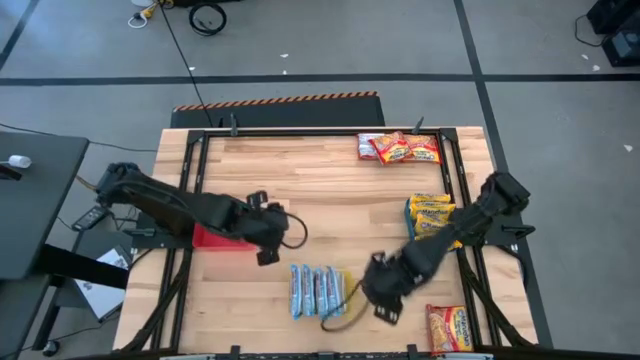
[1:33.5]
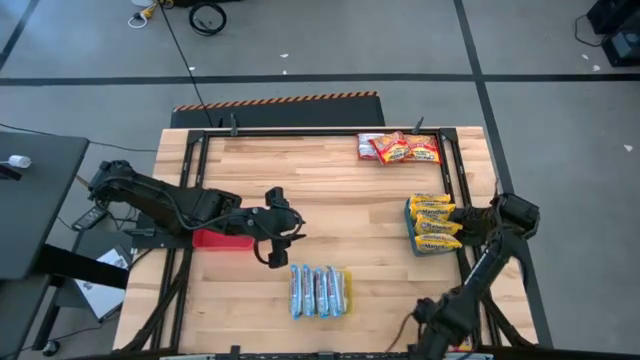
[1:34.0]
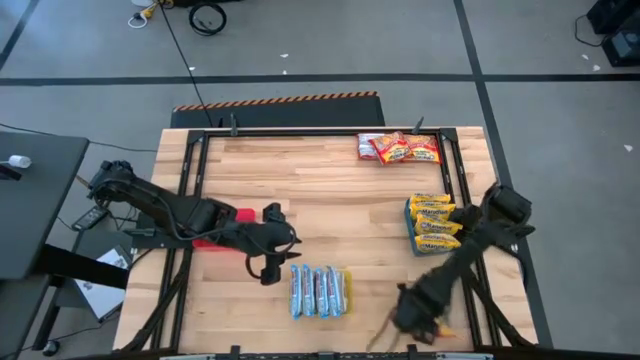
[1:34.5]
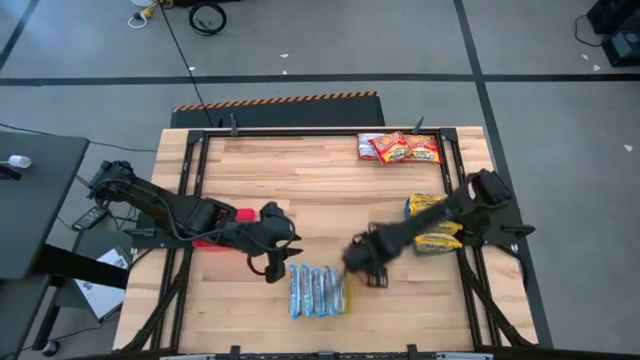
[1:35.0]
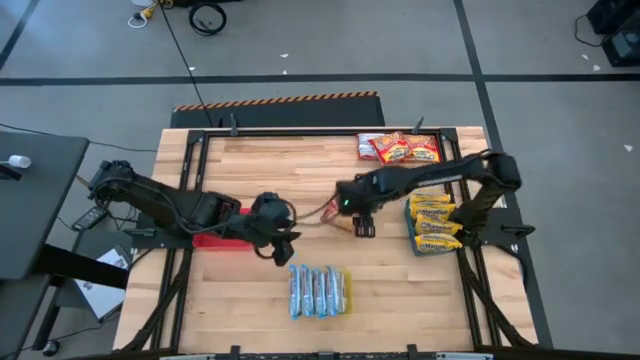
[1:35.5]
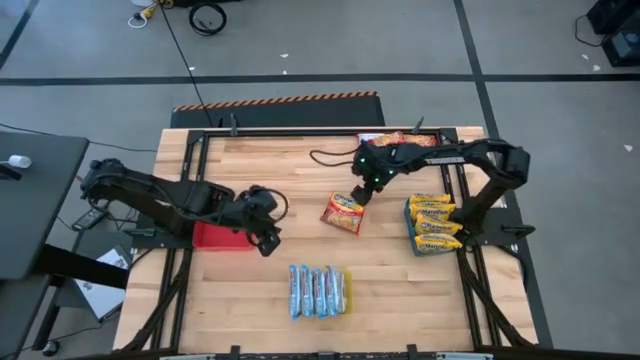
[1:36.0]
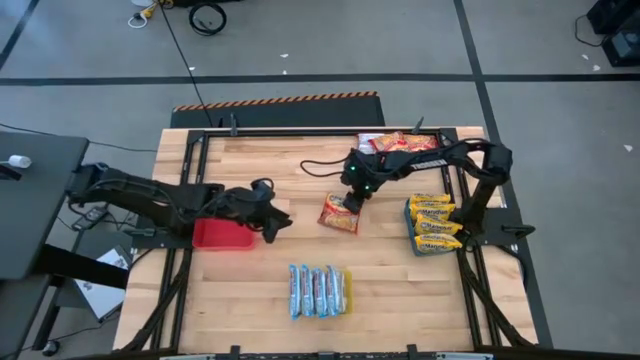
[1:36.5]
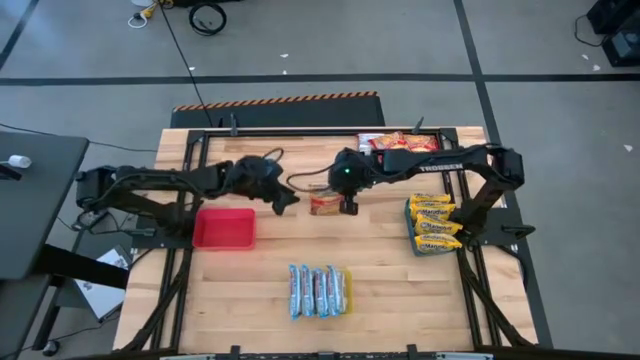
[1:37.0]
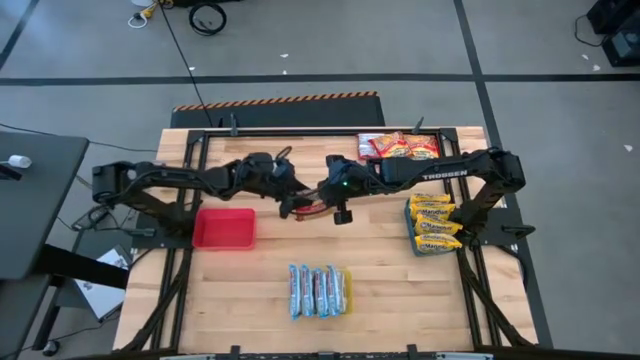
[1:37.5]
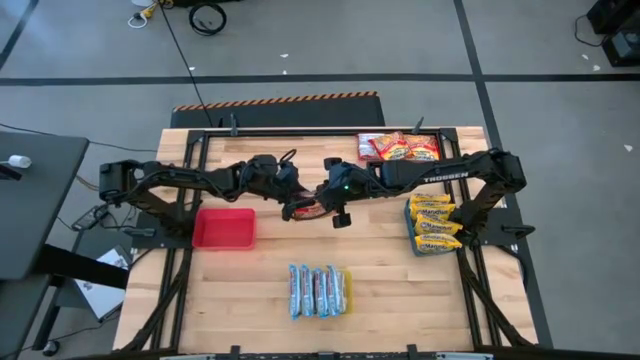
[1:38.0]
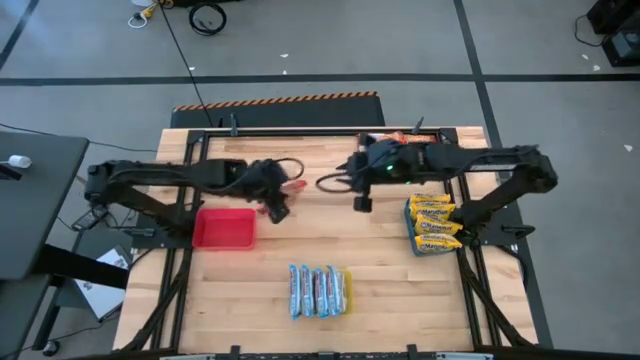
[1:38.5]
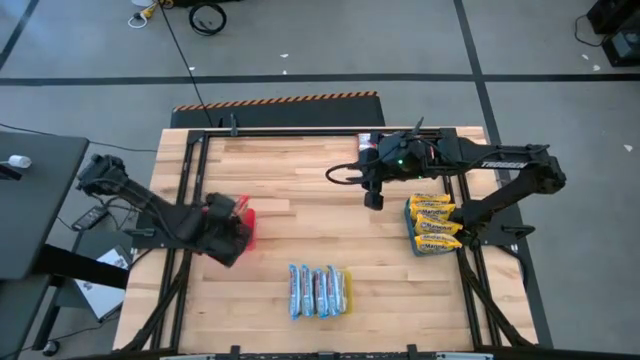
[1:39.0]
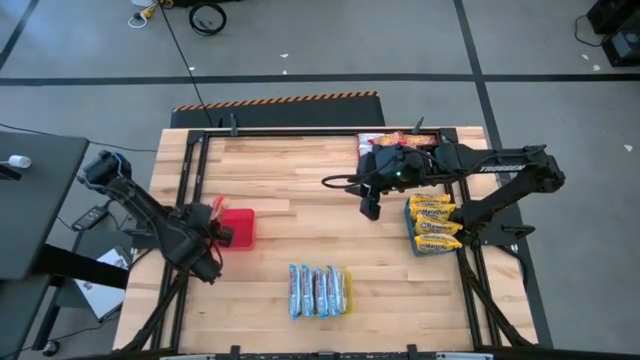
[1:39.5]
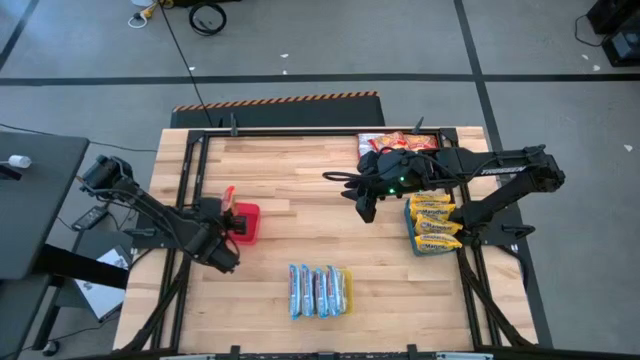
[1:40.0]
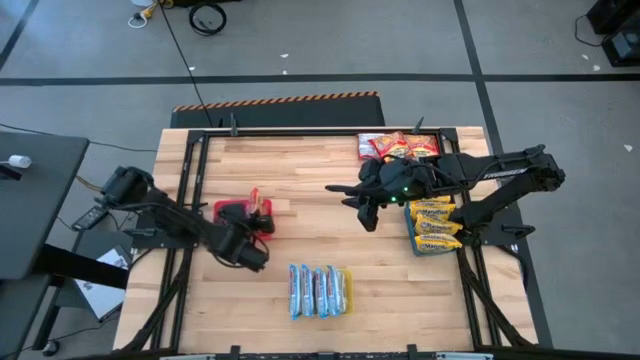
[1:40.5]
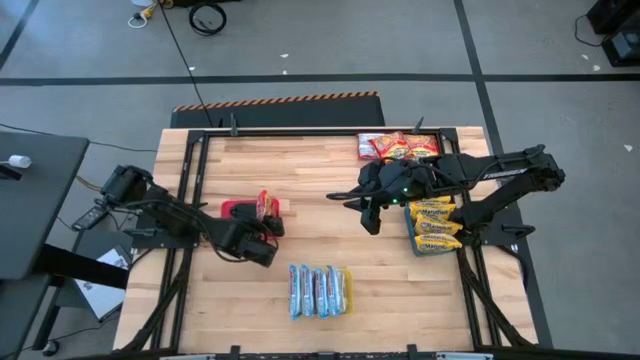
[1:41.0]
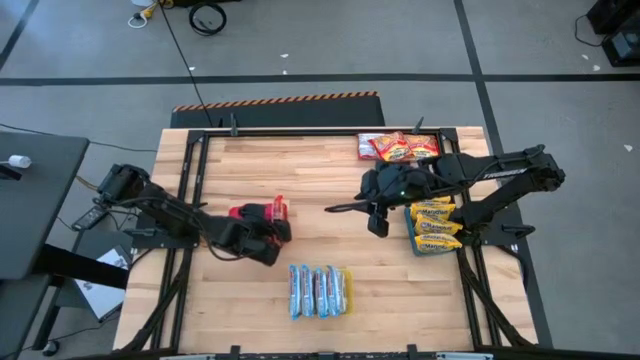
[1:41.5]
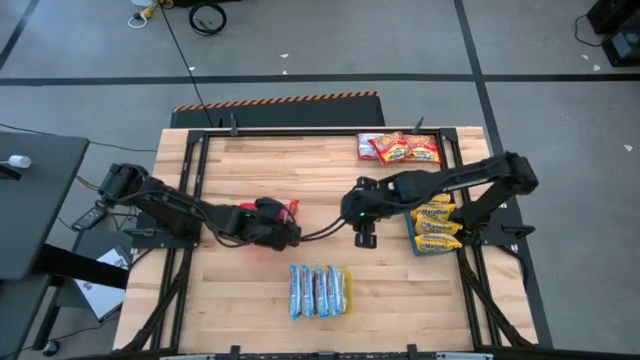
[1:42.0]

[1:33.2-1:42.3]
Task: Sort Maruchan noodles
Put the red noodle pack into the red bin

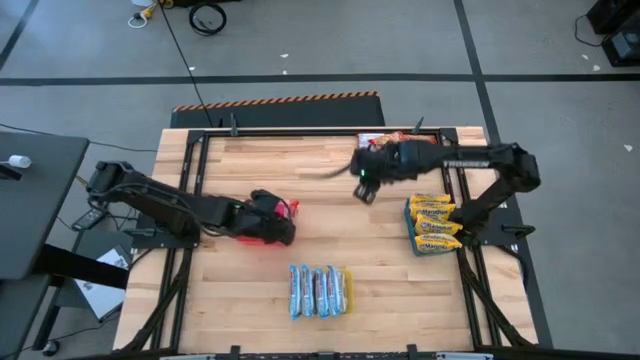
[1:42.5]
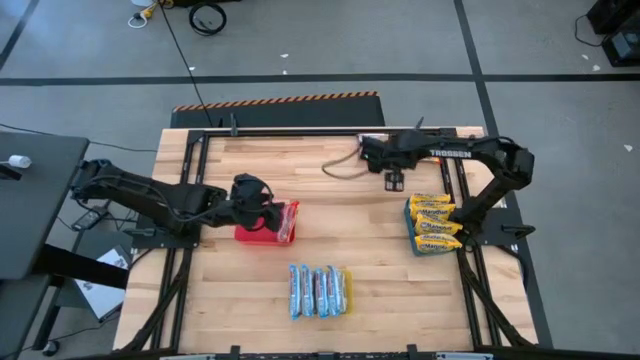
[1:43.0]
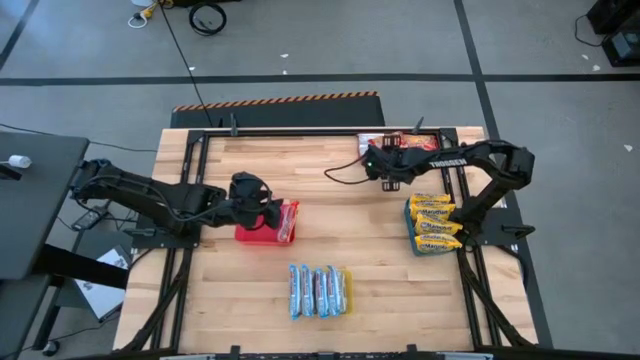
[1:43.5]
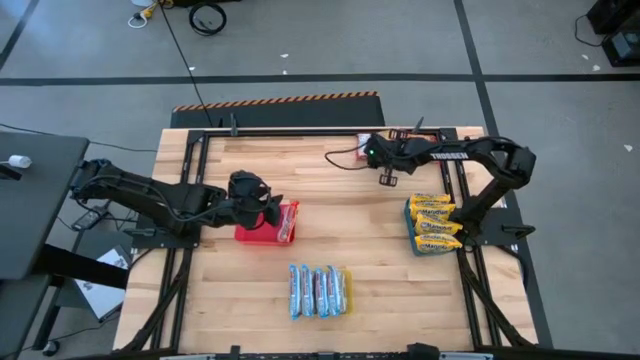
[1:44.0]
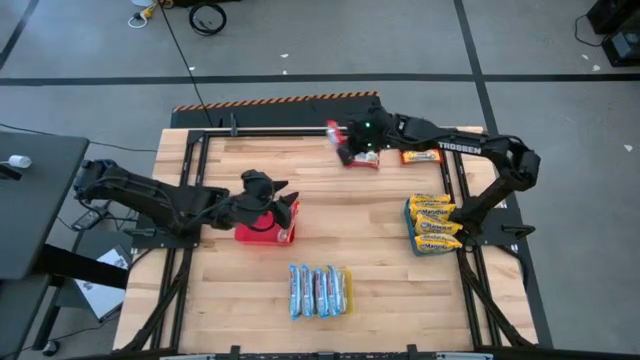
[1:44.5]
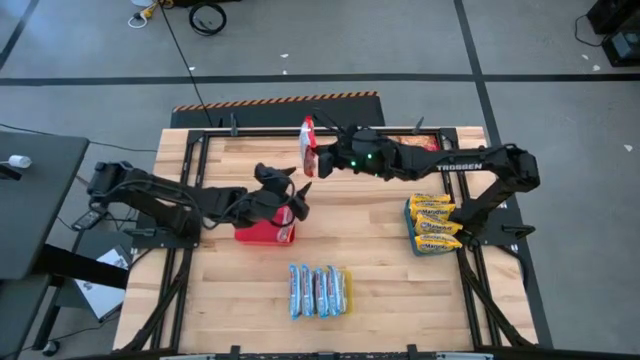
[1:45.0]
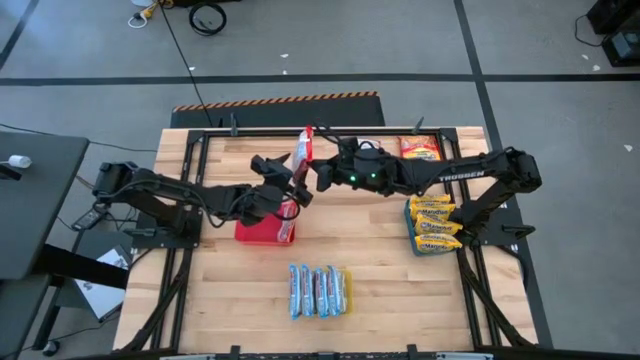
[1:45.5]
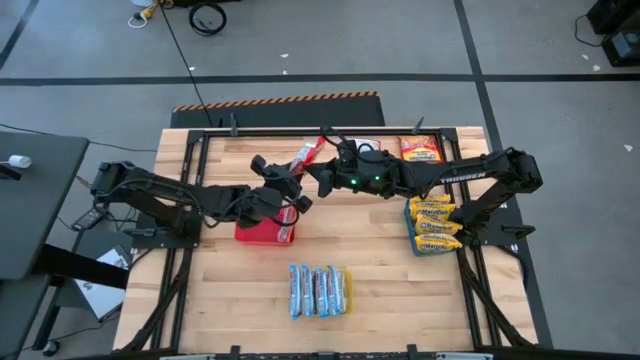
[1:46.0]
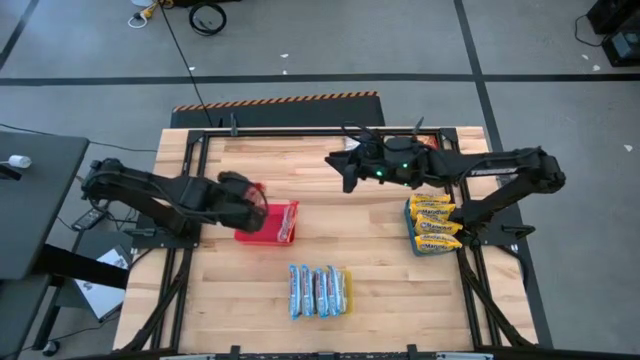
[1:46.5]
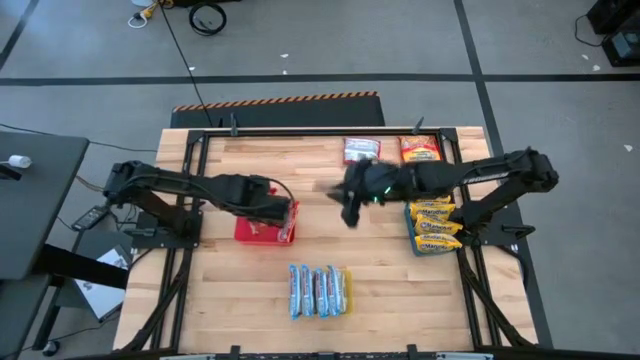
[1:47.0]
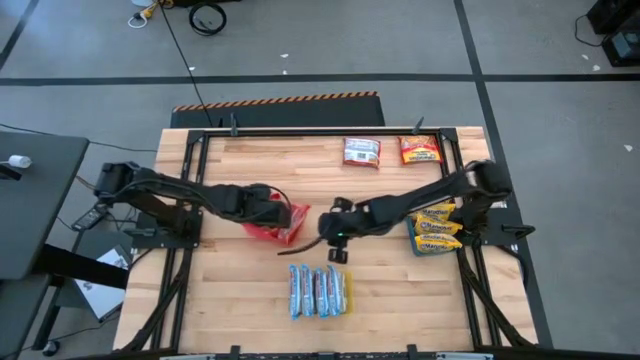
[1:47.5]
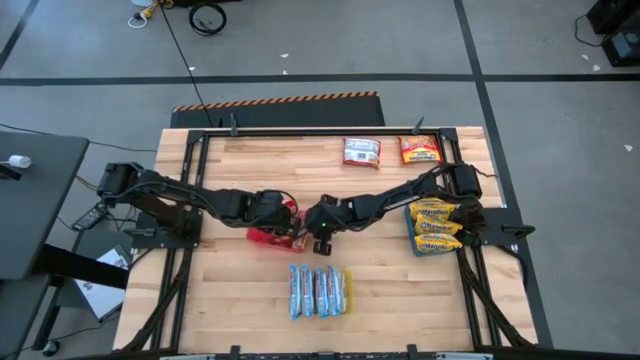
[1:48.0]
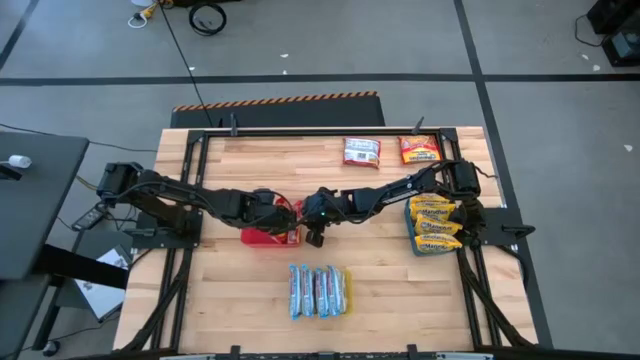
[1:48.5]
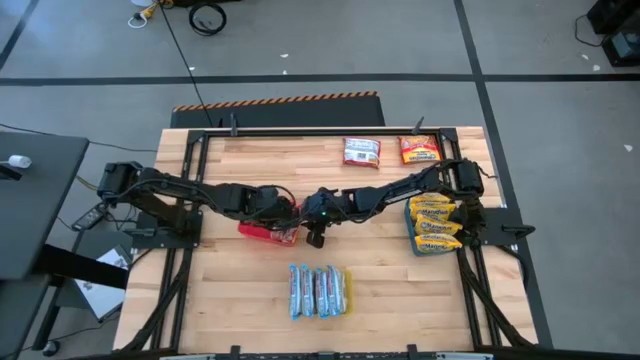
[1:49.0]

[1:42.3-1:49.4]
Put the red noodle pack into the red bin

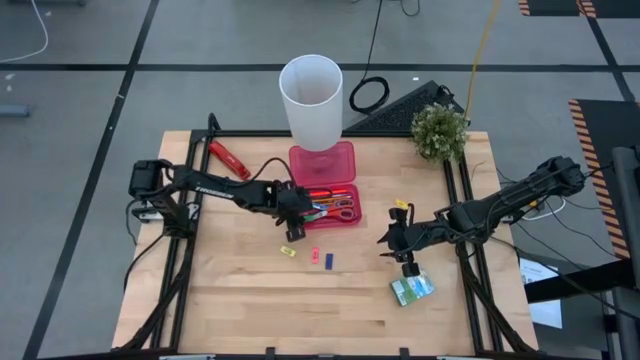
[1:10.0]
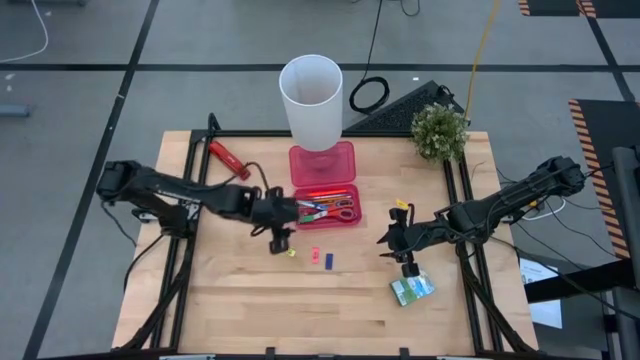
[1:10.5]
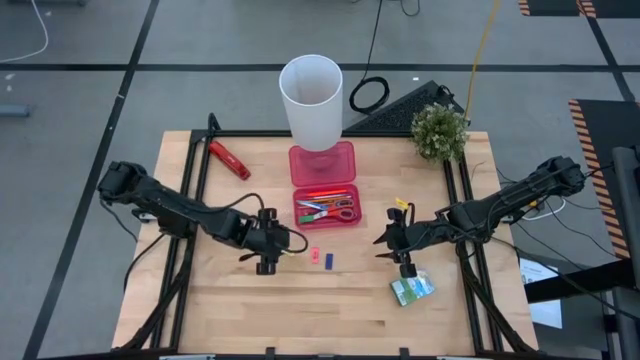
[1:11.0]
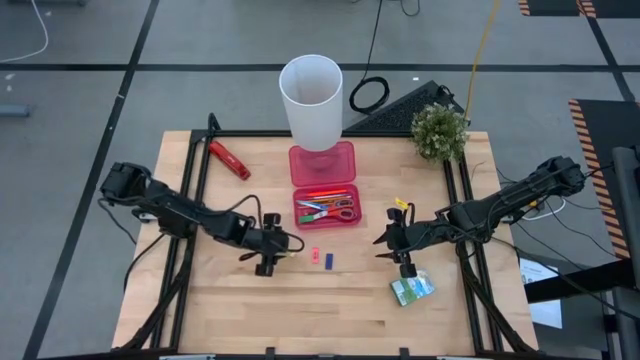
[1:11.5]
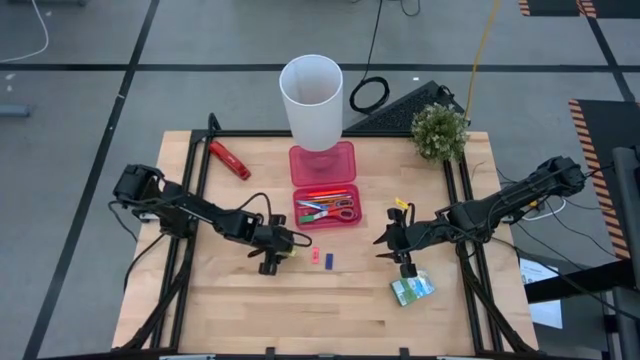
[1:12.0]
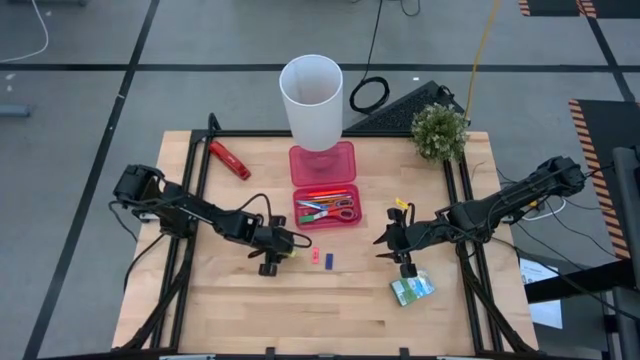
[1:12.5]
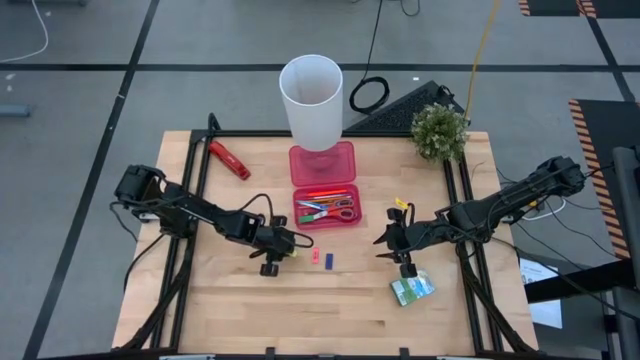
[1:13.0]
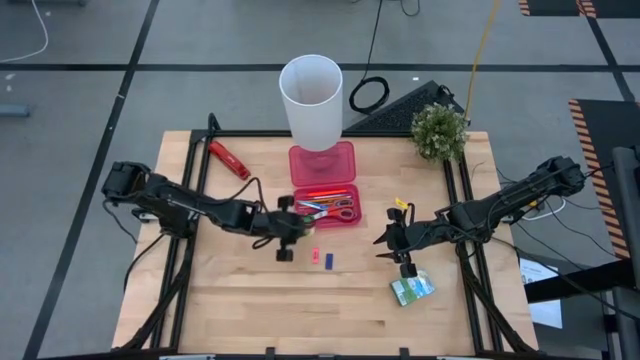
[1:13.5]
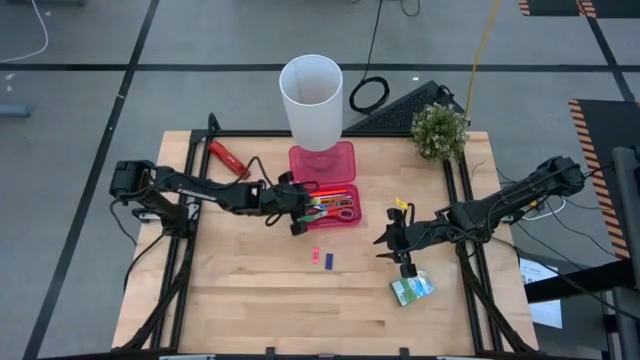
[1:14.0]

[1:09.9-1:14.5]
Task: Pack school essentials
Put the light green eraser into the pink supply box
